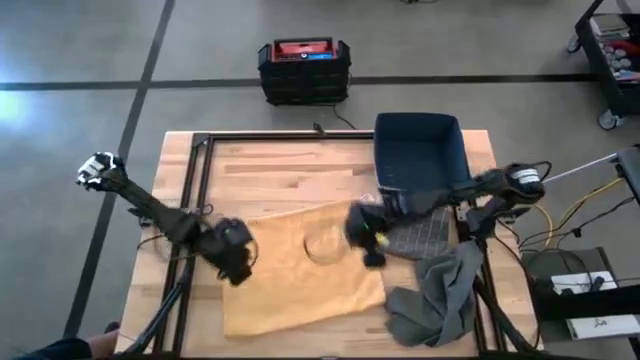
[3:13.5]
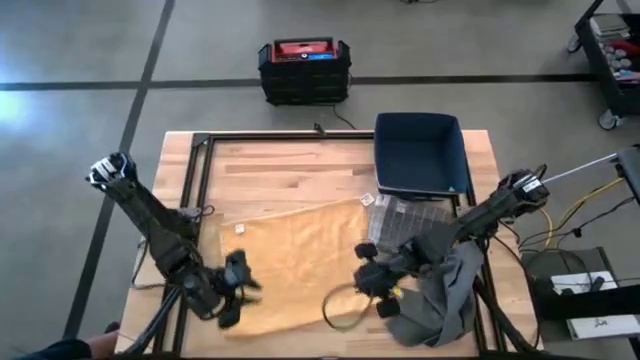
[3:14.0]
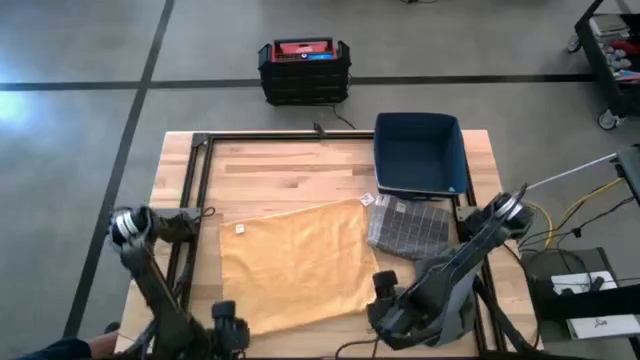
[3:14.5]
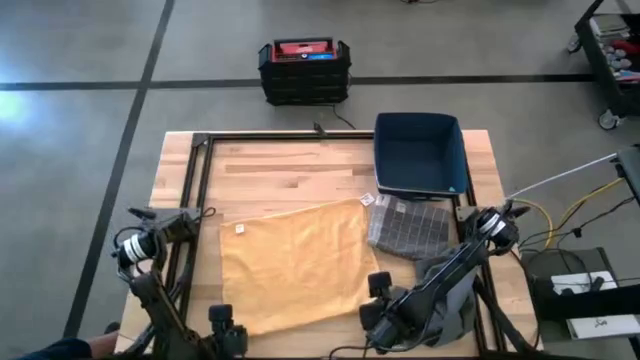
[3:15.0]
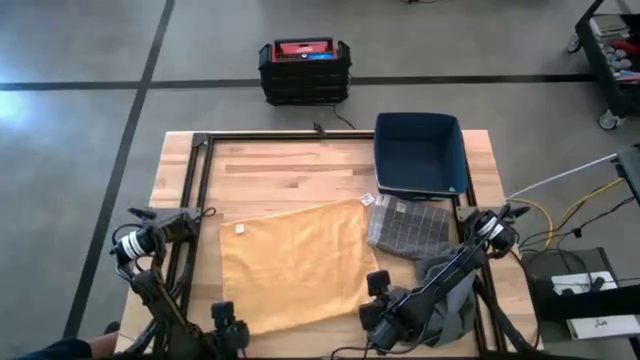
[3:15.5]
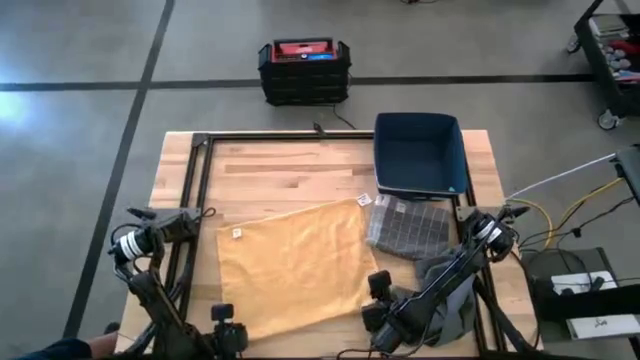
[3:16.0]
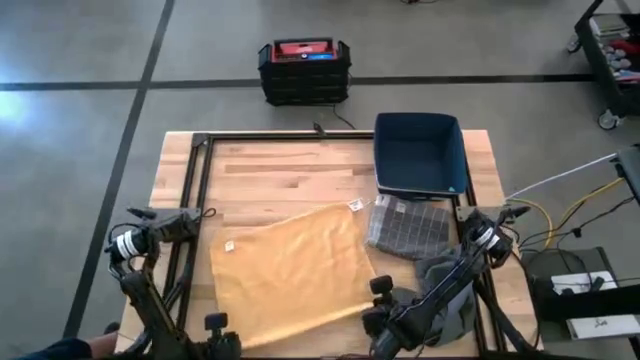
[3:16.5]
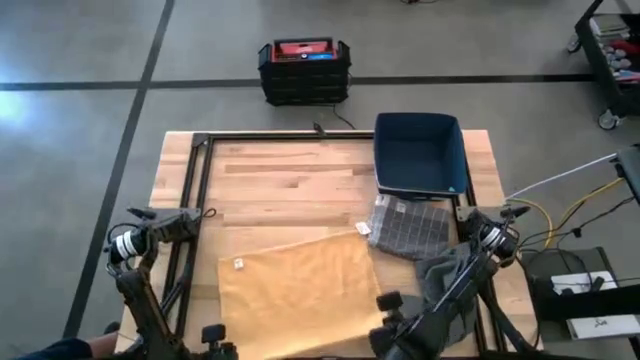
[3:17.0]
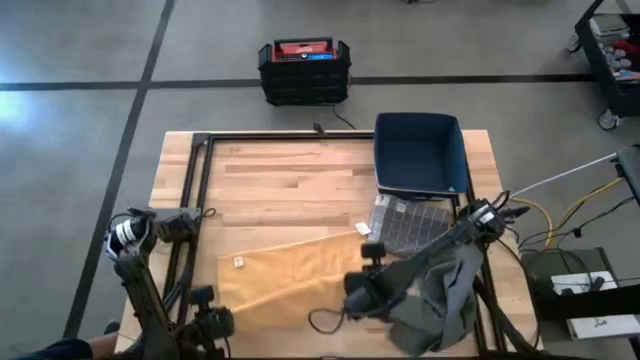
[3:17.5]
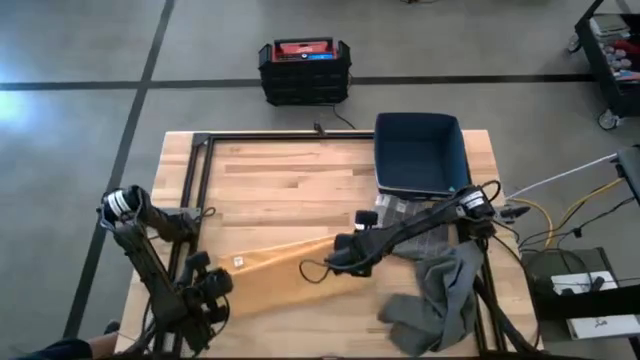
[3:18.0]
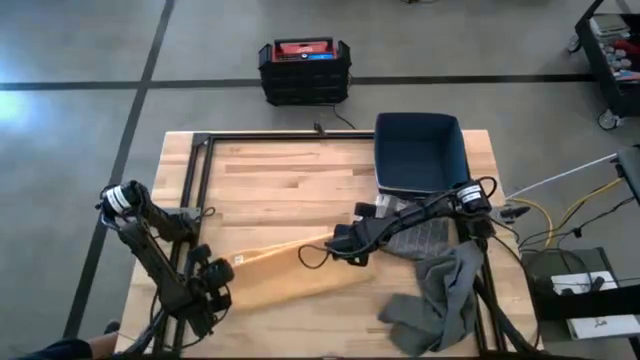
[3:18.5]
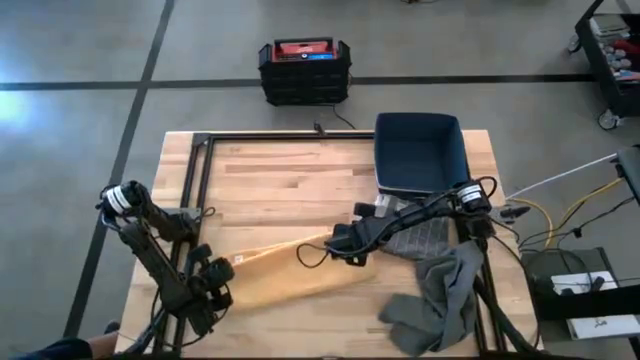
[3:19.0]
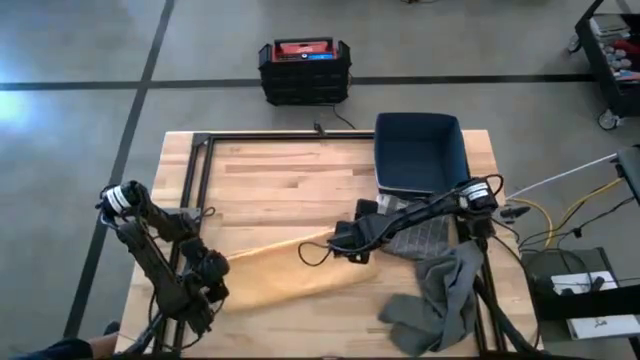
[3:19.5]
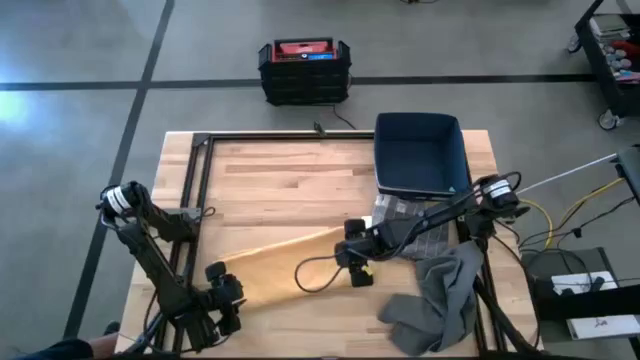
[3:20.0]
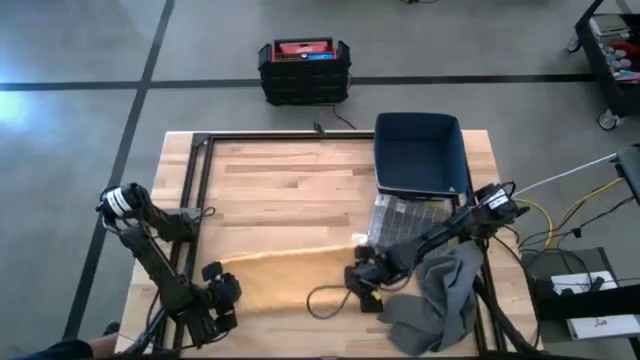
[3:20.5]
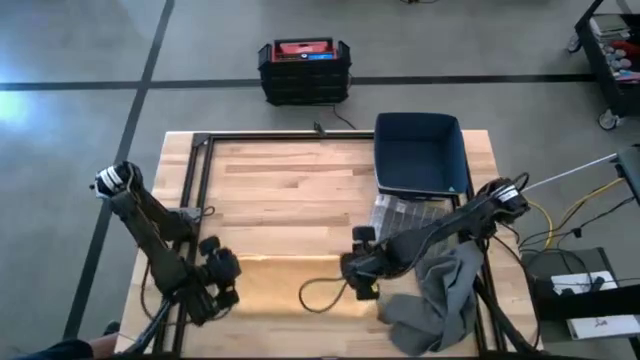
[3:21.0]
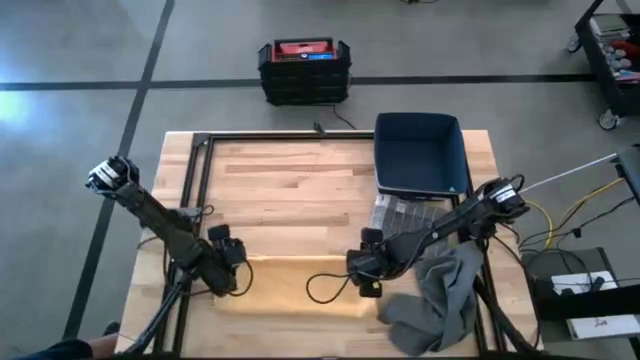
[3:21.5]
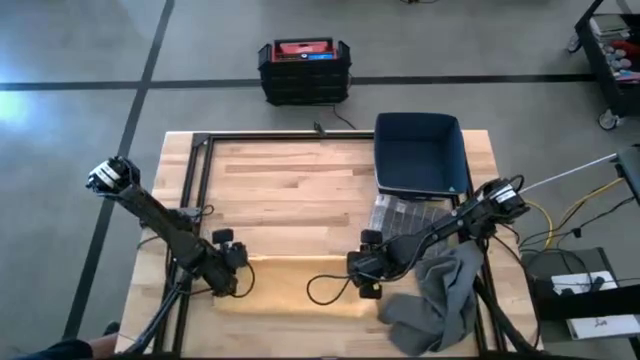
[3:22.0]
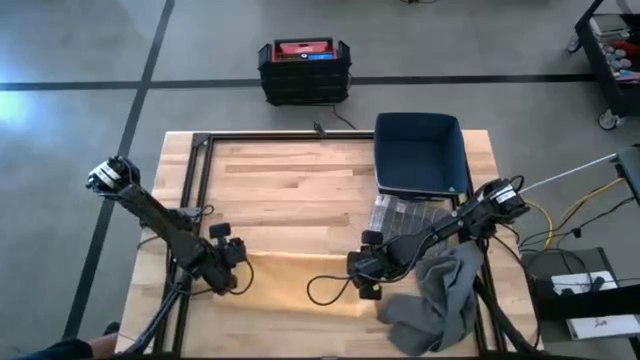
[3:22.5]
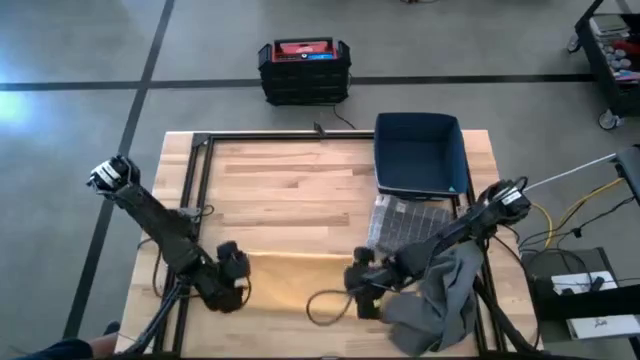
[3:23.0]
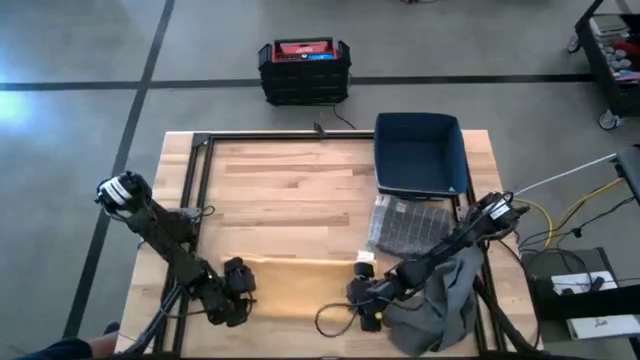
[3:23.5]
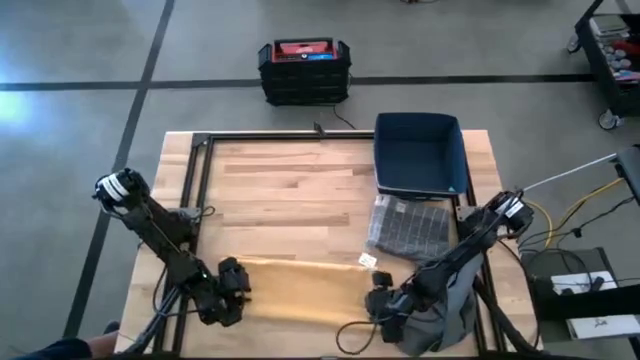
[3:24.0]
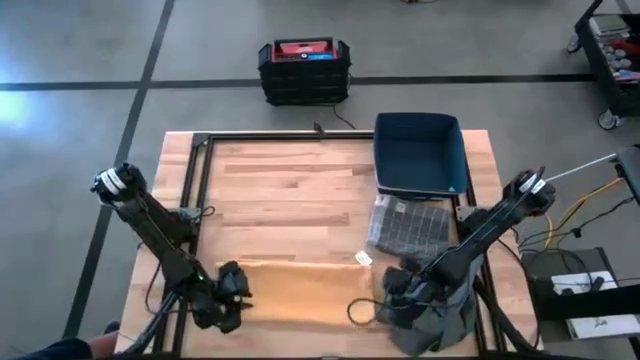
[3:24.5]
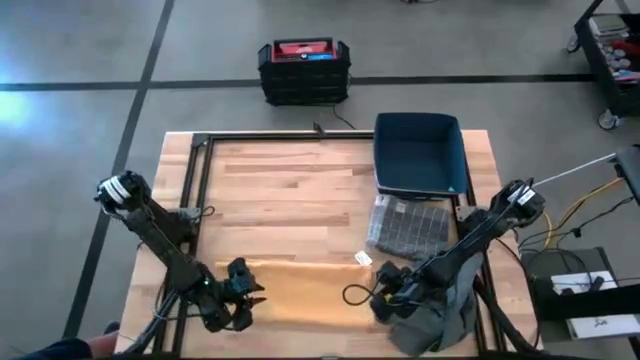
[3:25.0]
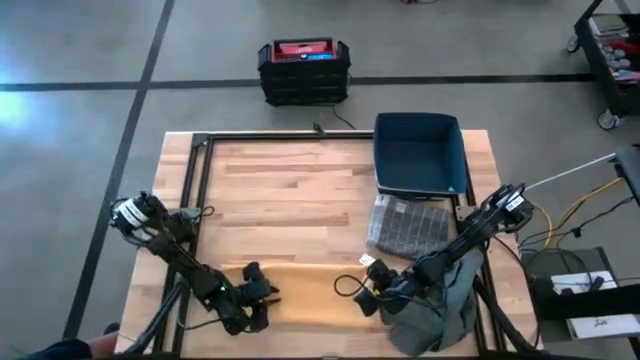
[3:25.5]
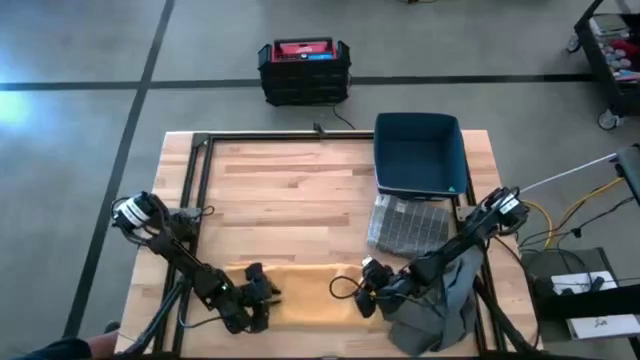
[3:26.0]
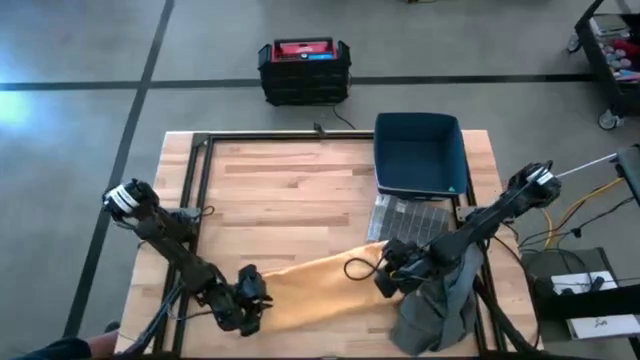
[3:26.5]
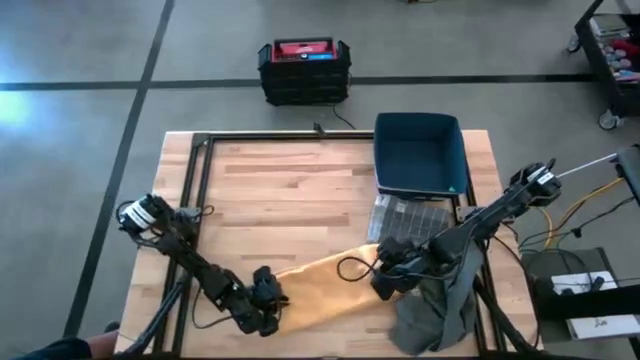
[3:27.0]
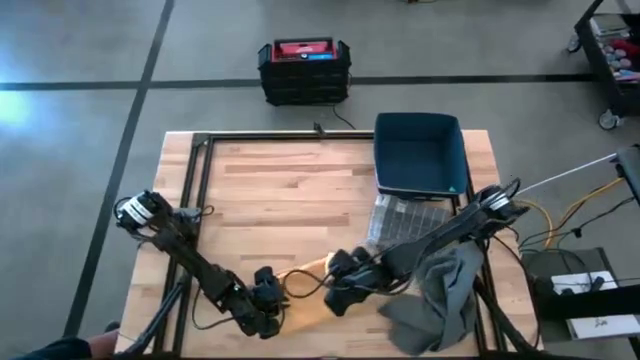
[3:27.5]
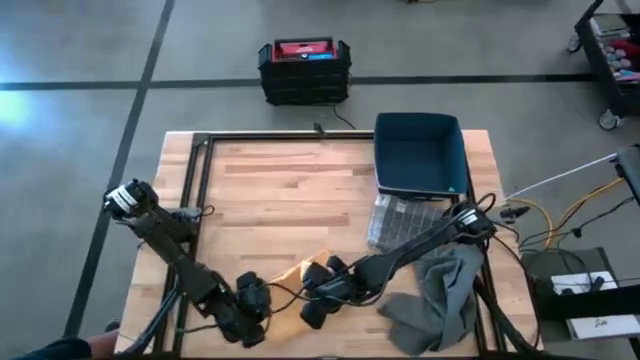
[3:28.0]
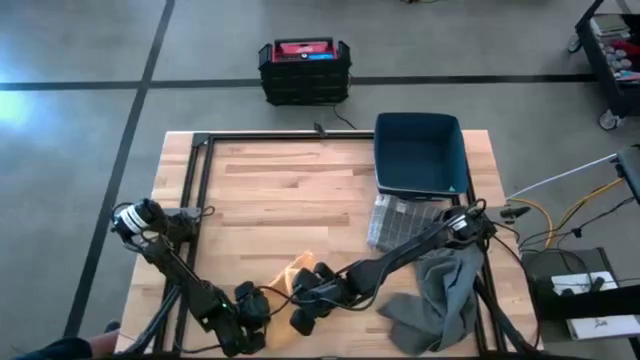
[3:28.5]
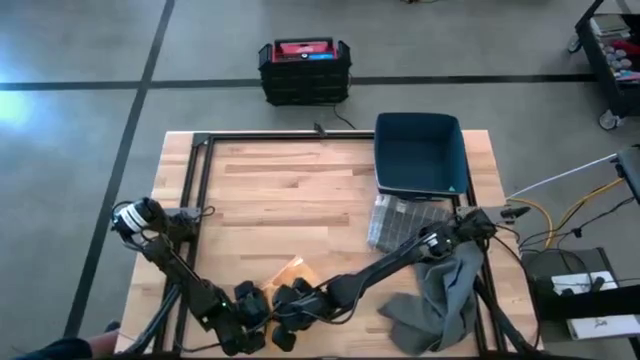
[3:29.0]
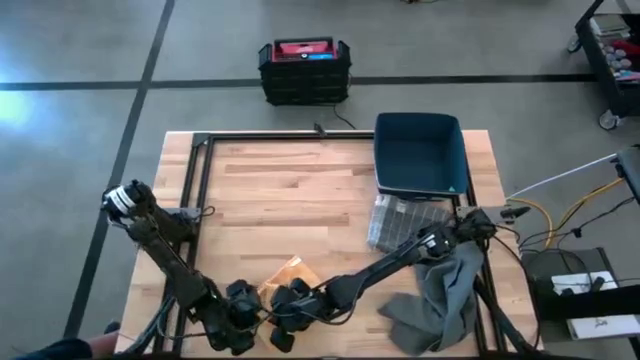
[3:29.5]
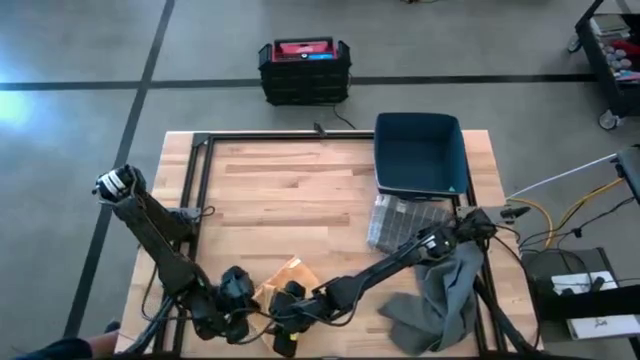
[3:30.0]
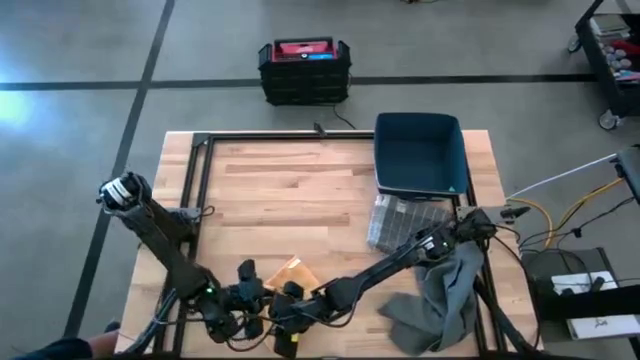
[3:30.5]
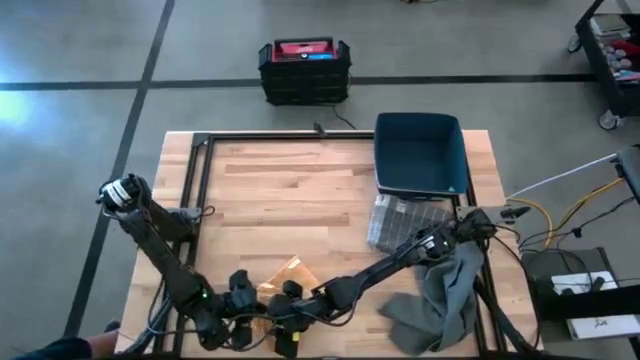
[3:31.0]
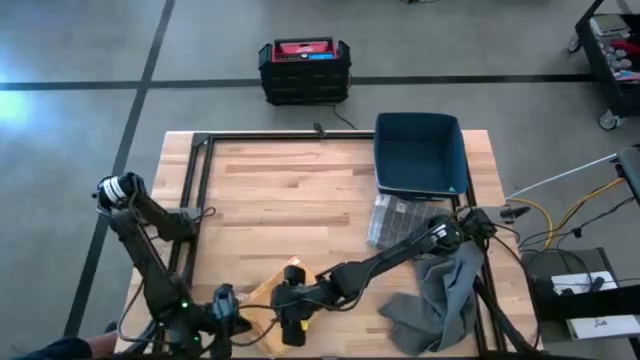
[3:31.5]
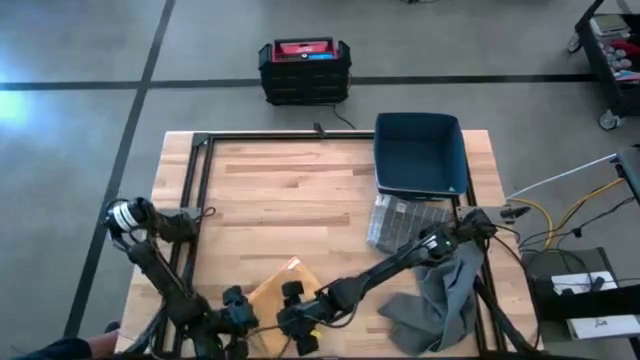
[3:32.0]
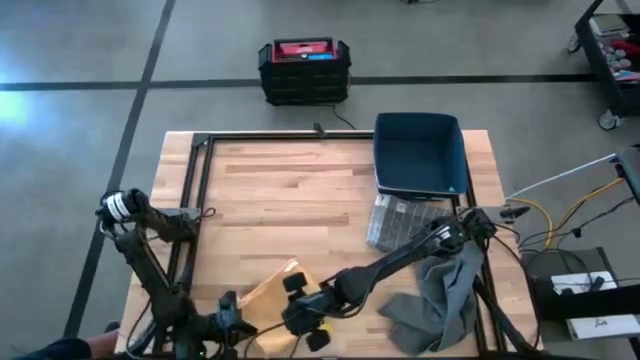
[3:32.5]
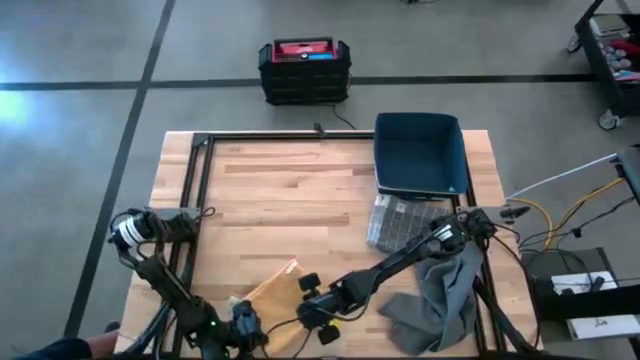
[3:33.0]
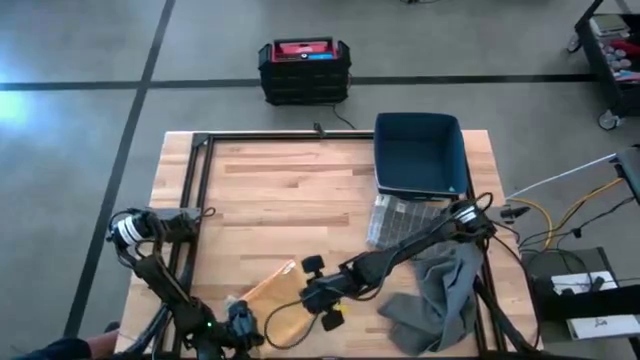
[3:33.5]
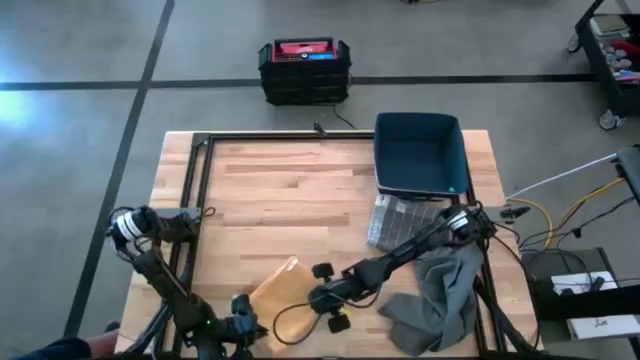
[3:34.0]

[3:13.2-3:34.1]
Task: Fold towel
Fold the yellow kitchen towel
